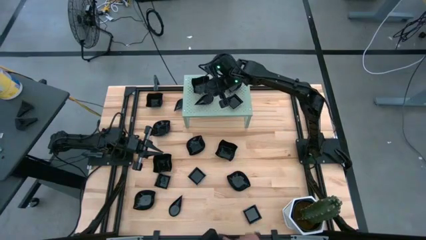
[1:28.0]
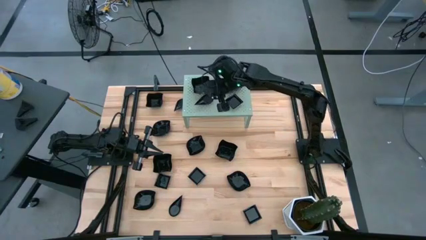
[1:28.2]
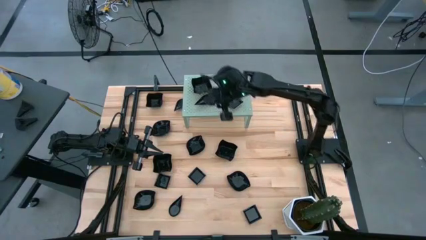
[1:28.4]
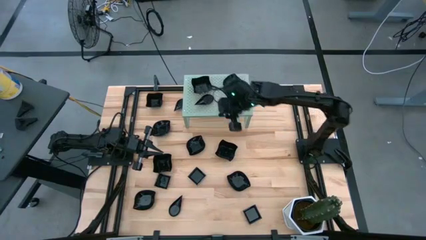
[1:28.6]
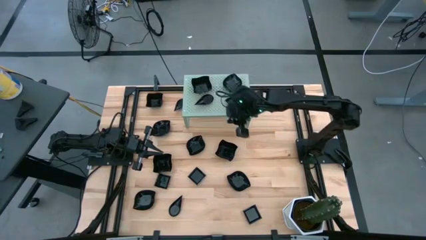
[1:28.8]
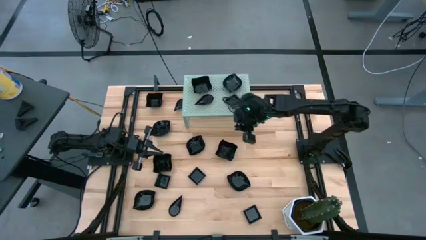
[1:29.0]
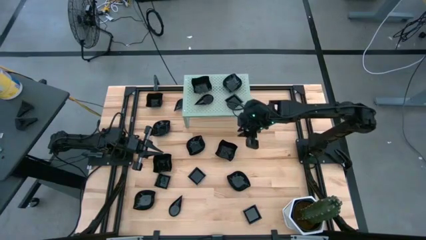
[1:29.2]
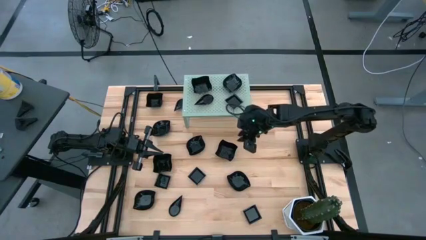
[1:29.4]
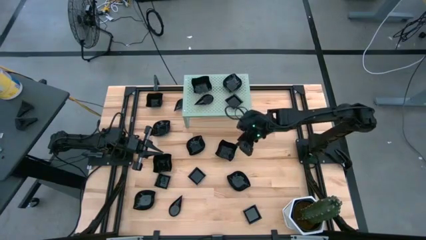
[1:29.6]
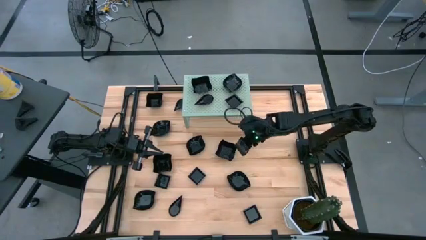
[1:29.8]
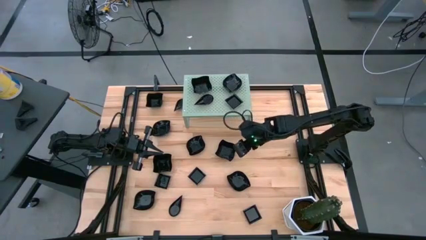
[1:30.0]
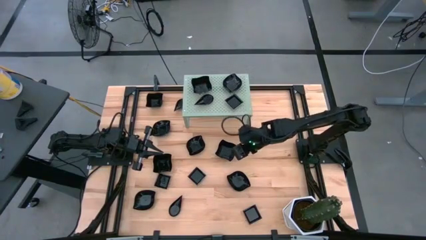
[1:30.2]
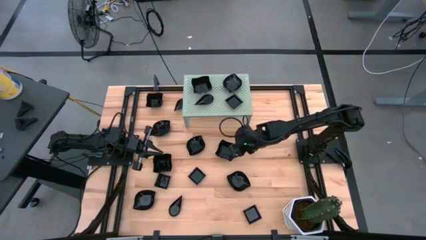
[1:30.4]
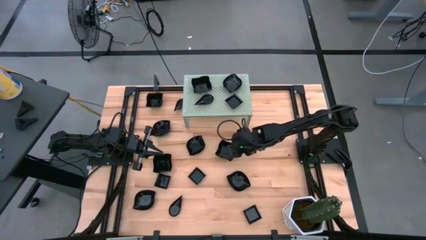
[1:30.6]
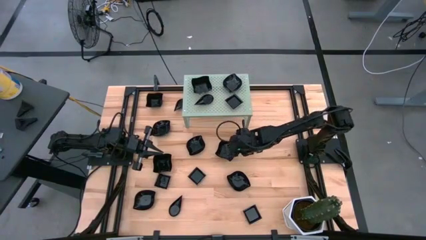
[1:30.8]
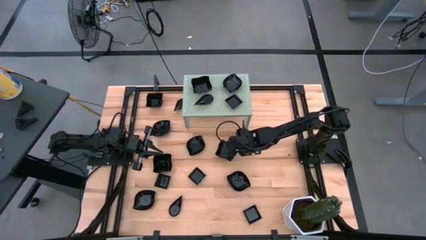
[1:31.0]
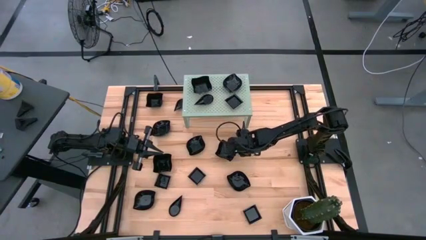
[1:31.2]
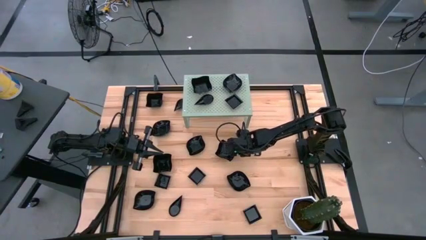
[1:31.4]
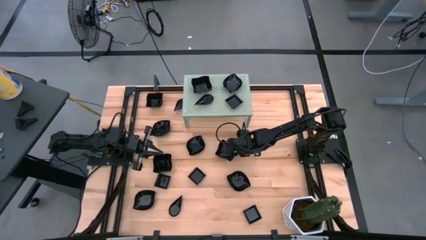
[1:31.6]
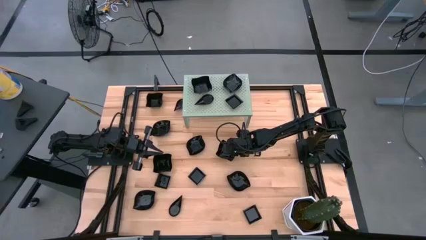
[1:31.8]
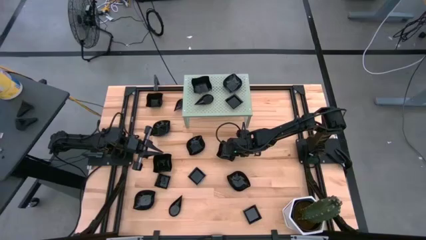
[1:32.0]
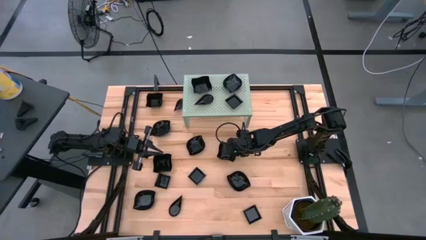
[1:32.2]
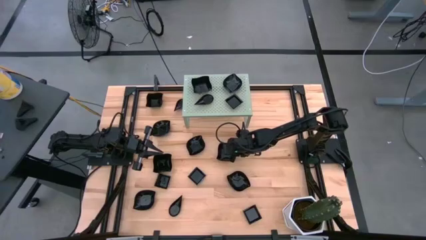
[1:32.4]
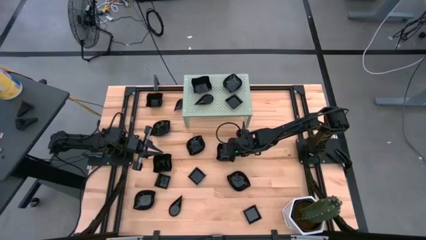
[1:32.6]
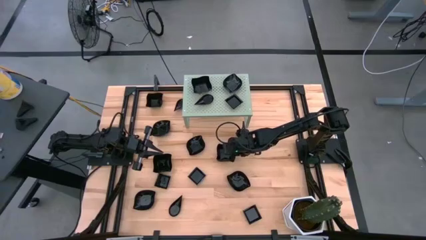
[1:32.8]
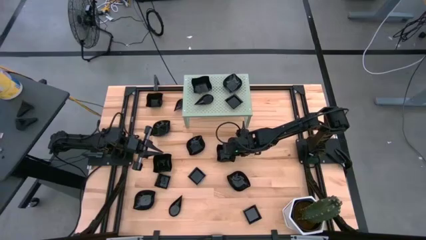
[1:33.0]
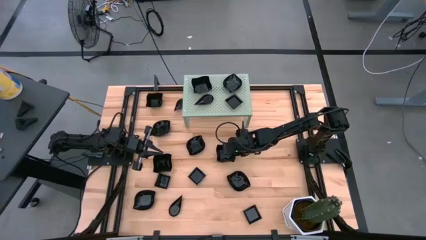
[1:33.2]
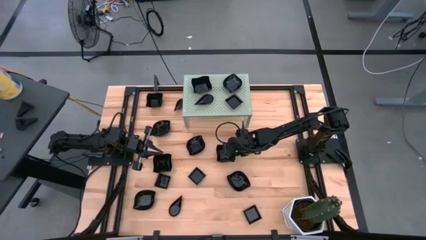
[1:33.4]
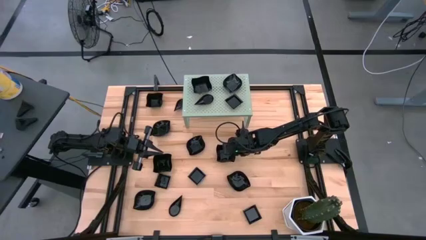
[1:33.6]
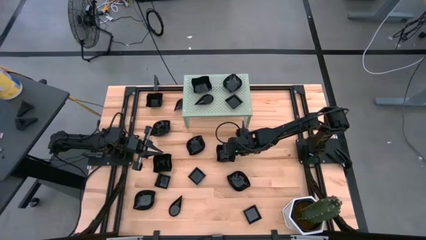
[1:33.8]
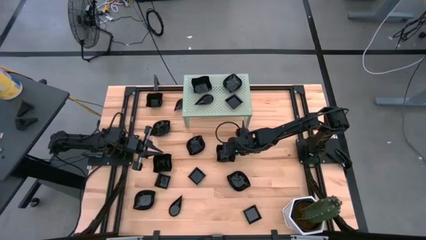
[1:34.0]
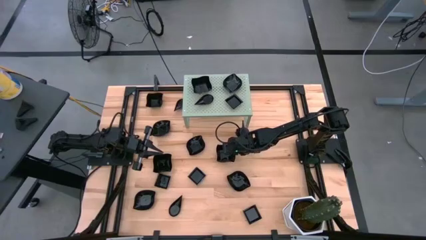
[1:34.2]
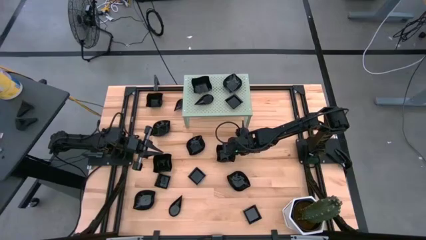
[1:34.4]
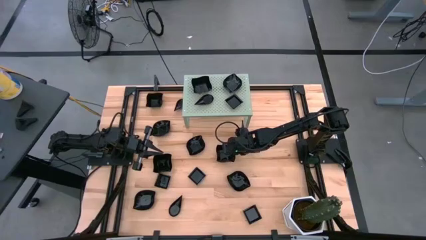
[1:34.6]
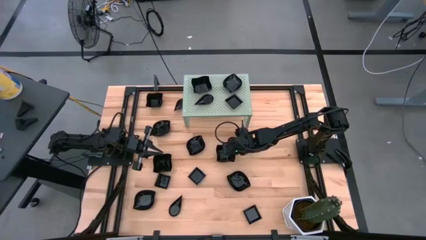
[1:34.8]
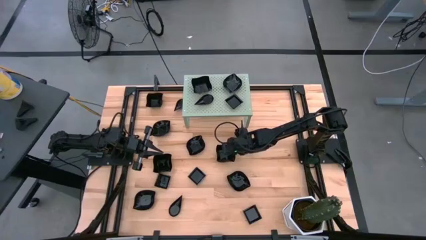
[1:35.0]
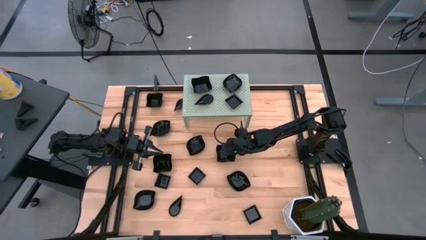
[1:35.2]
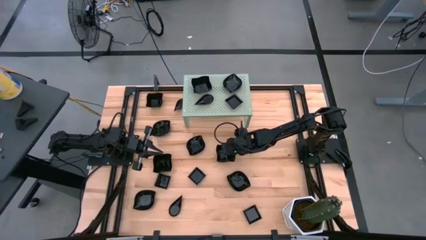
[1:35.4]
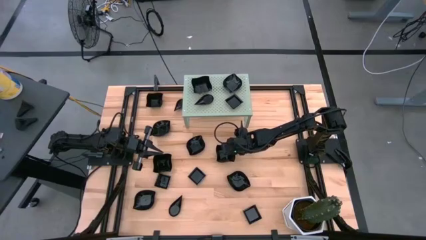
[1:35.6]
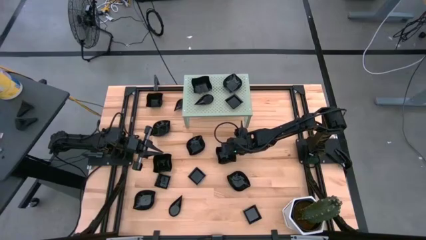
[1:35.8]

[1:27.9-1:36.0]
Task: Pick & Place Mini shaped plates
Stack the distorted square plate on top of the distorted square plate on the shelf

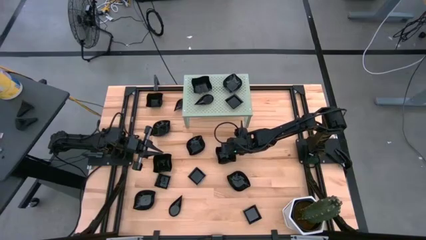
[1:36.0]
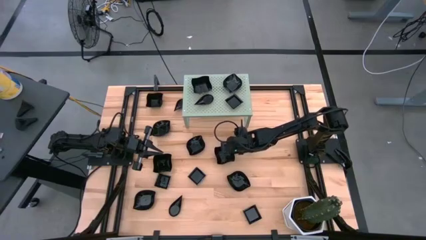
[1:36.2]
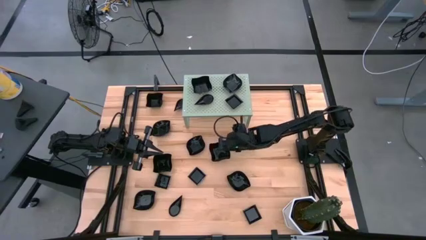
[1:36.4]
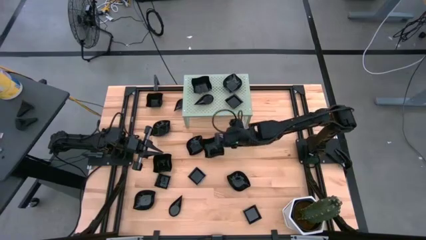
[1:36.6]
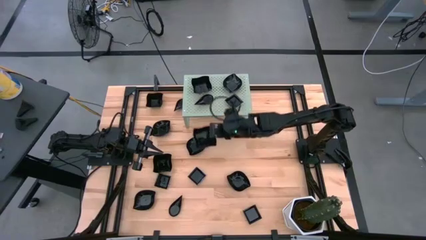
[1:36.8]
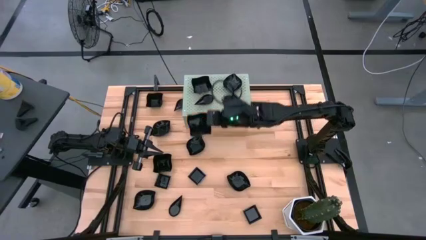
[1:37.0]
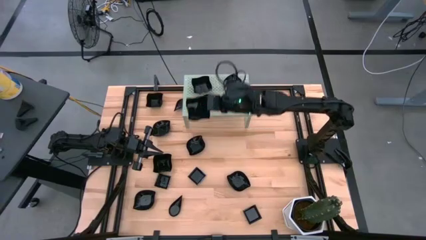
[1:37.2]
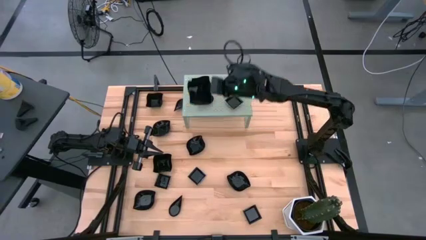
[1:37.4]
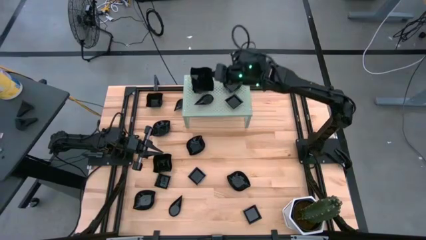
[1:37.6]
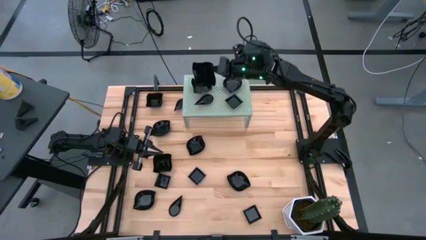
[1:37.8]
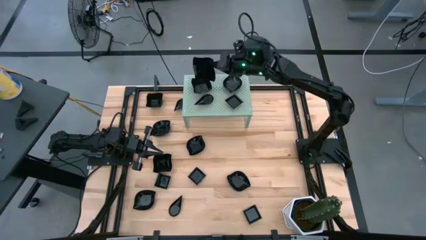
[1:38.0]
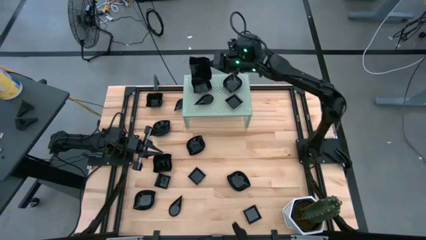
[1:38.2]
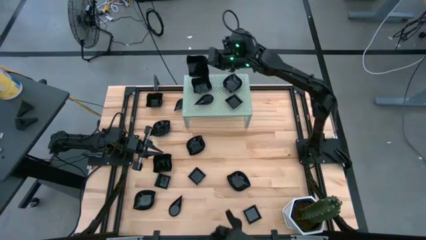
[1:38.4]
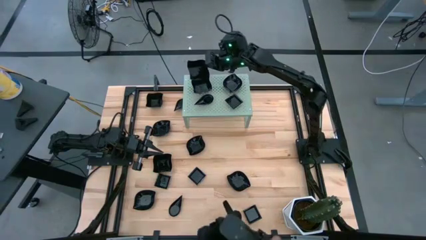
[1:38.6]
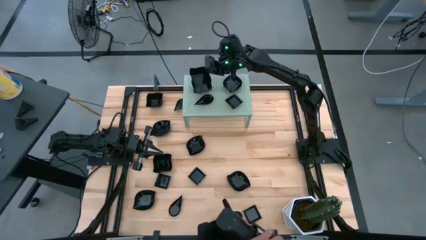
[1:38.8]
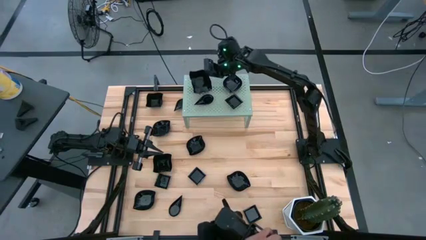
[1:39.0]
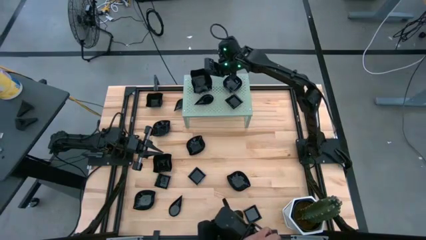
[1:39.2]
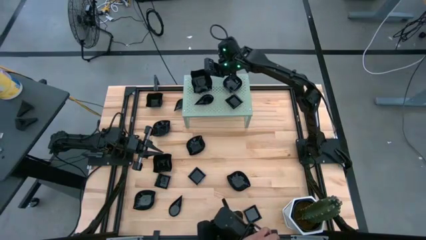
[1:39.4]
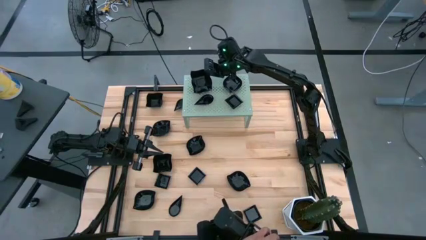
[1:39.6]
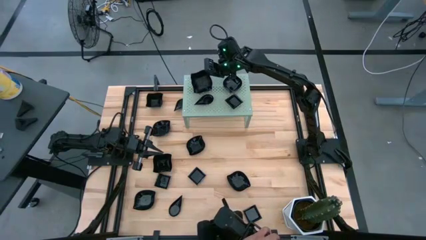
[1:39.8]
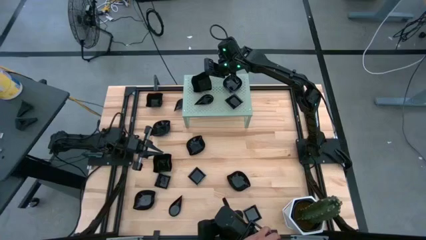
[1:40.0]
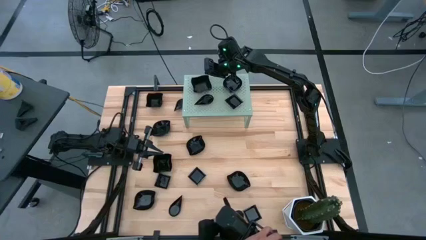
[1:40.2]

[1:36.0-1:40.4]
Stack the distorted square plate on top of the distorted square plate on the shelf

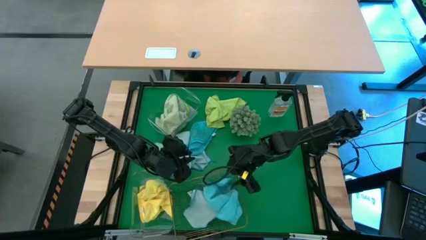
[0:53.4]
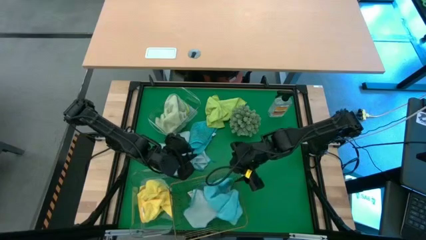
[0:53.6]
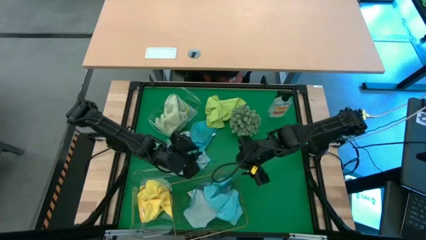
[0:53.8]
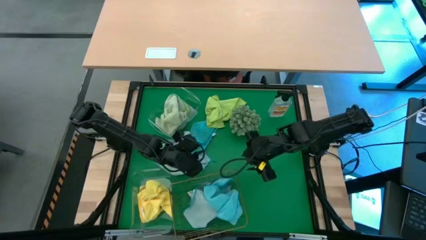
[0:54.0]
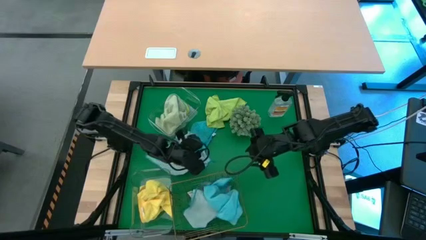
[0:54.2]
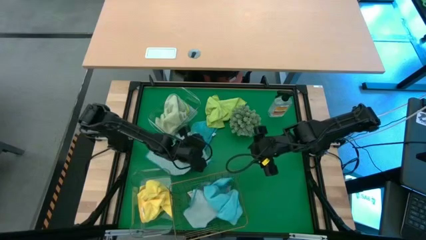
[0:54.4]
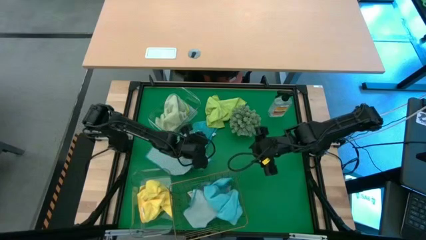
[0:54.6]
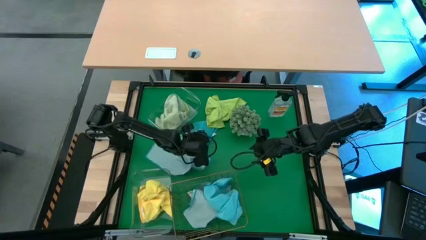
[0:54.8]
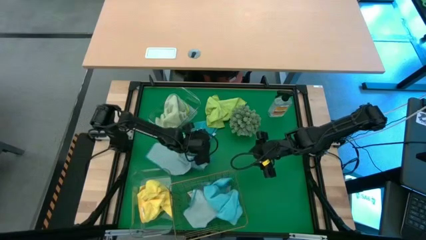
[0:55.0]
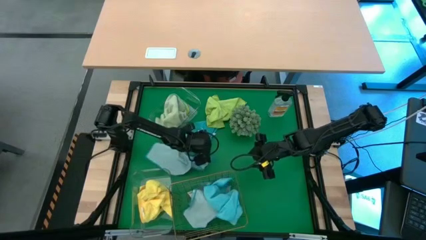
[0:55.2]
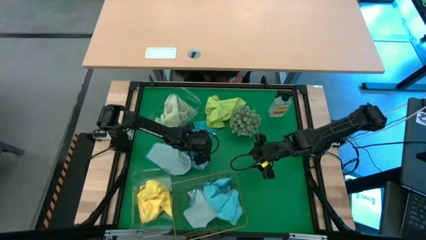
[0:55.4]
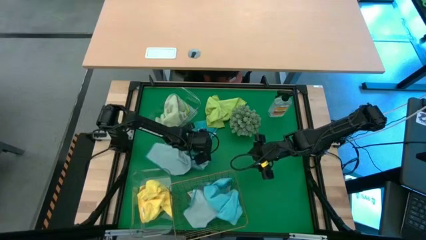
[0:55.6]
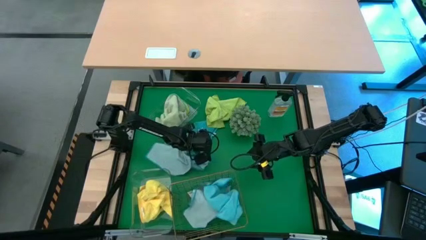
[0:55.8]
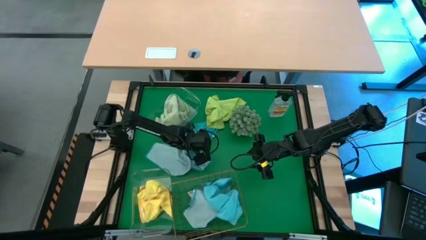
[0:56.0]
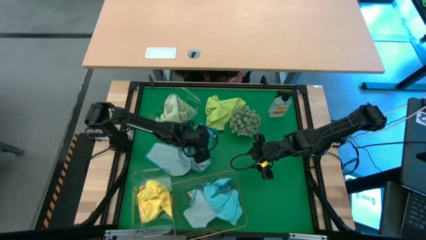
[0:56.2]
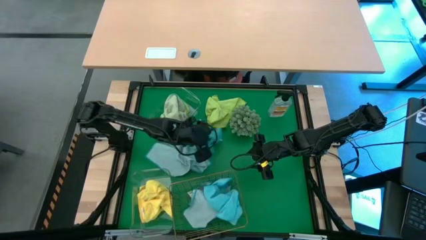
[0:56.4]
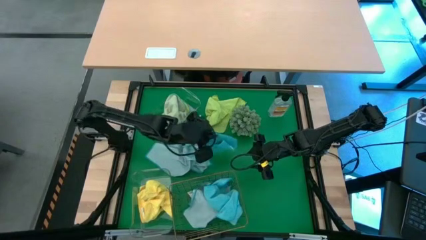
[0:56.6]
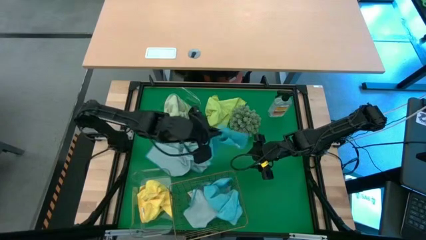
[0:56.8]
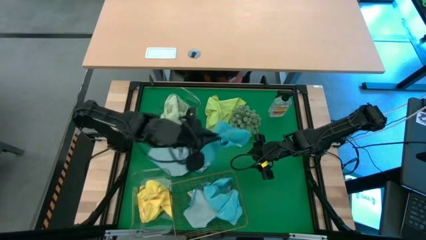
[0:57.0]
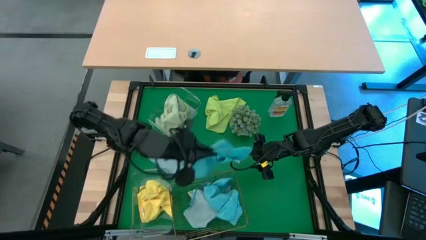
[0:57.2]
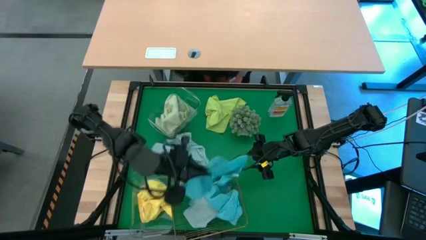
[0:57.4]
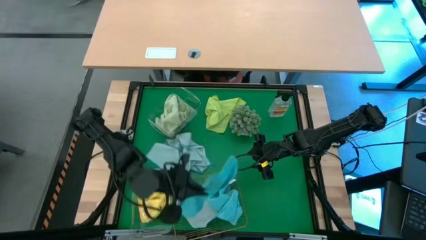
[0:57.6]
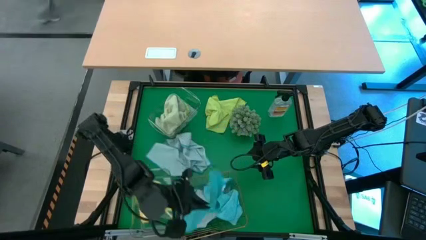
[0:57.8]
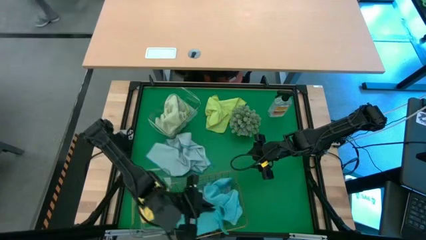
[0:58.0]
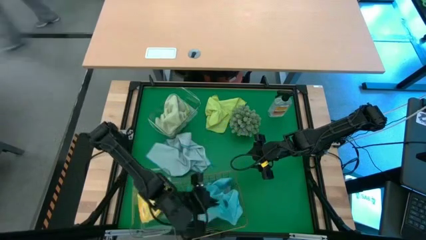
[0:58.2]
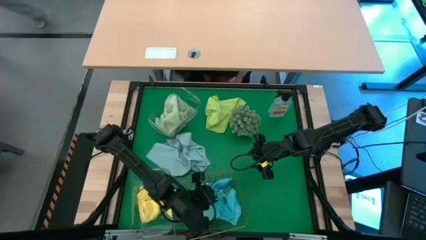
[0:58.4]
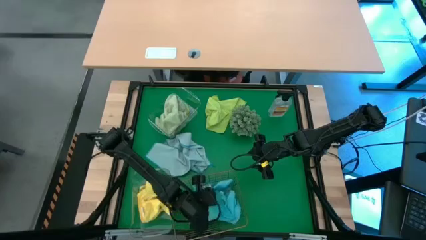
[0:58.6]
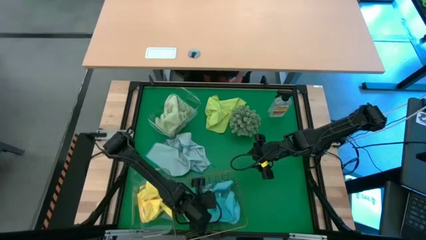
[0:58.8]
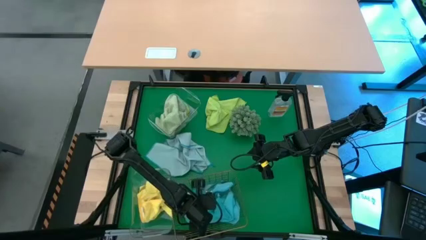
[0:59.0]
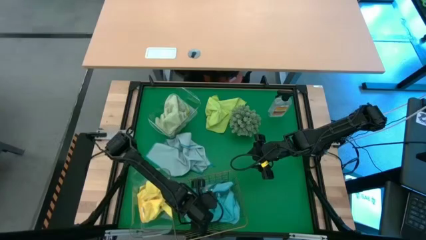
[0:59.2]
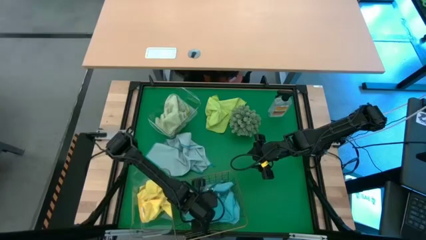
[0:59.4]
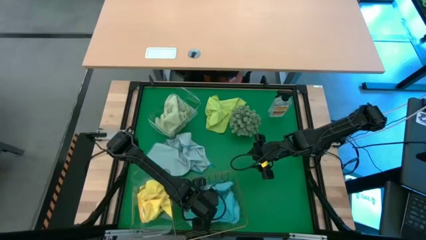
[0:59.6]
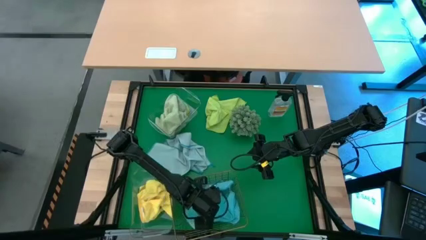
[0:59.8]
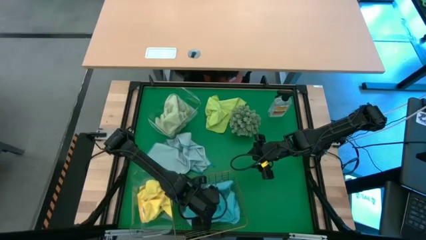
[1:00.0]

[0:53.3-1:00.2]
Task: Sort microfiber towel by color & place in baskets
Put the blue microfiber towel into the wire basket
